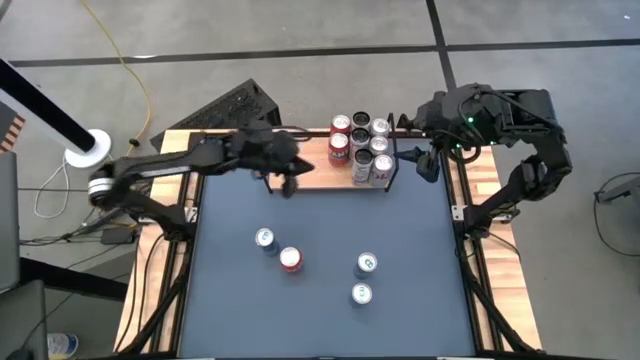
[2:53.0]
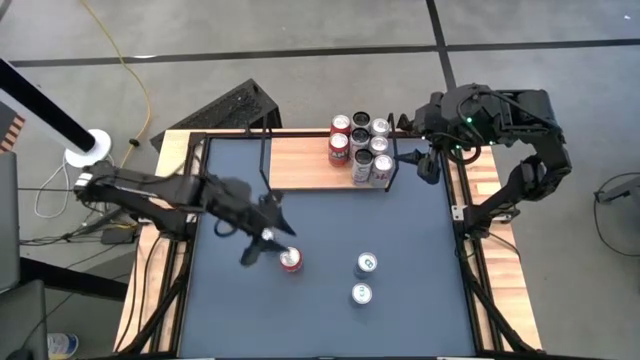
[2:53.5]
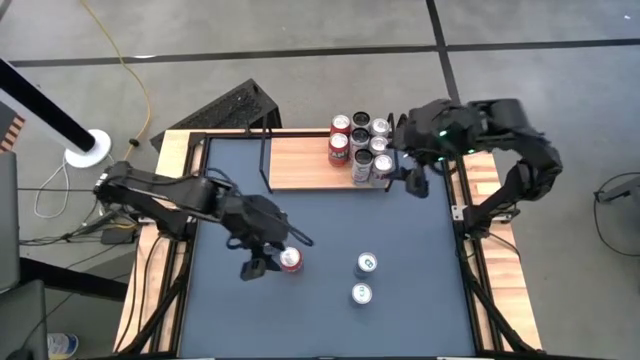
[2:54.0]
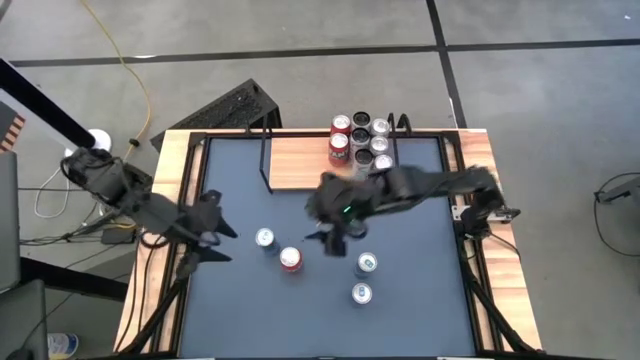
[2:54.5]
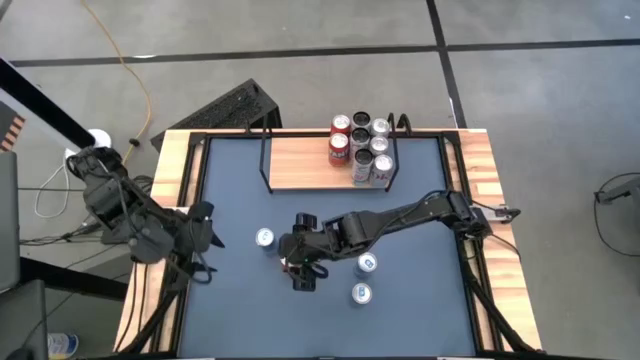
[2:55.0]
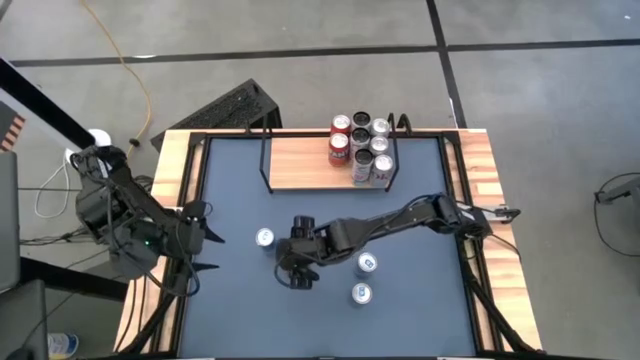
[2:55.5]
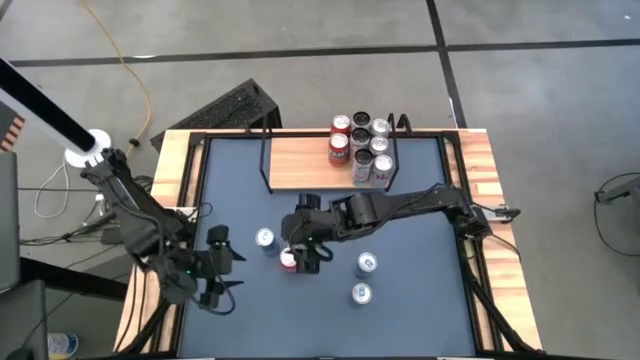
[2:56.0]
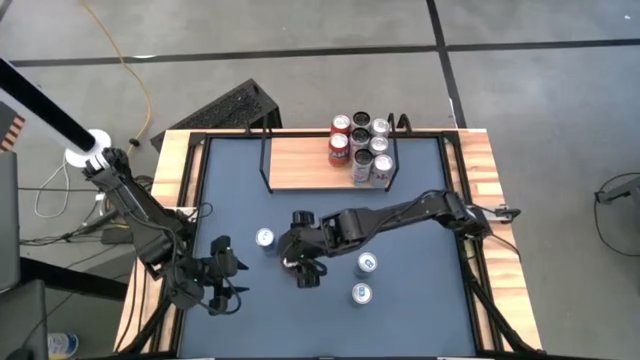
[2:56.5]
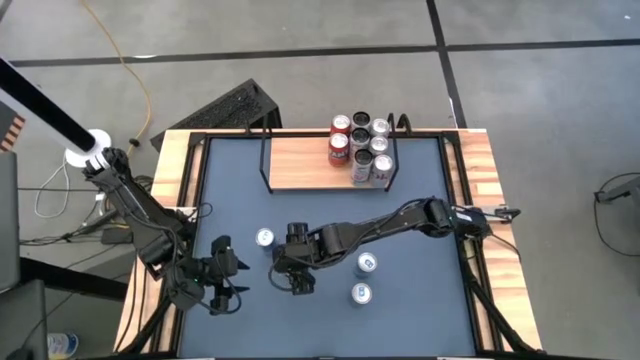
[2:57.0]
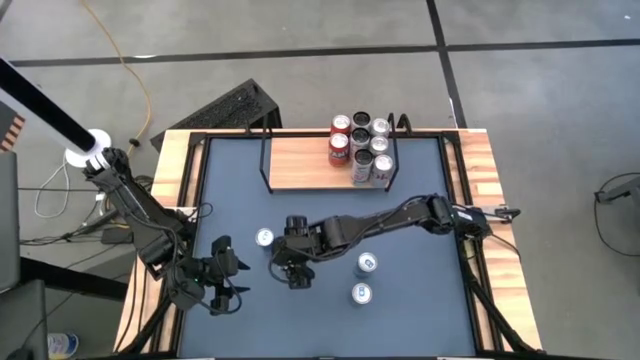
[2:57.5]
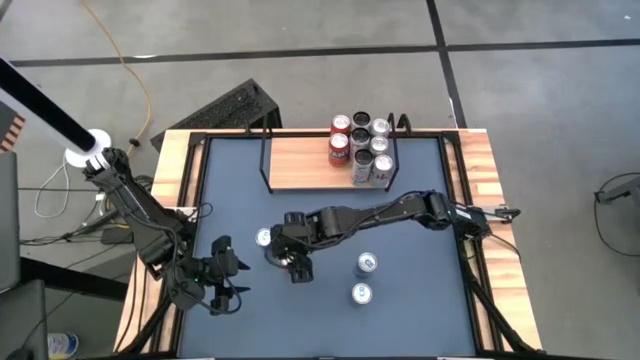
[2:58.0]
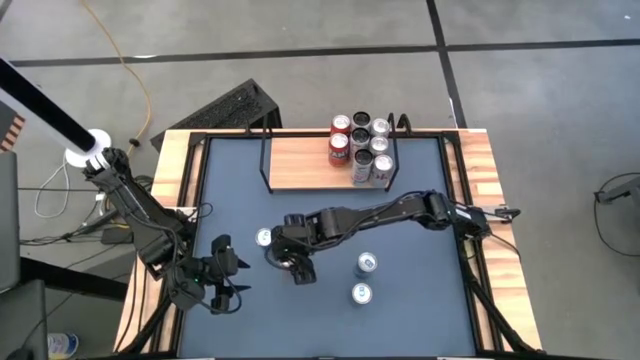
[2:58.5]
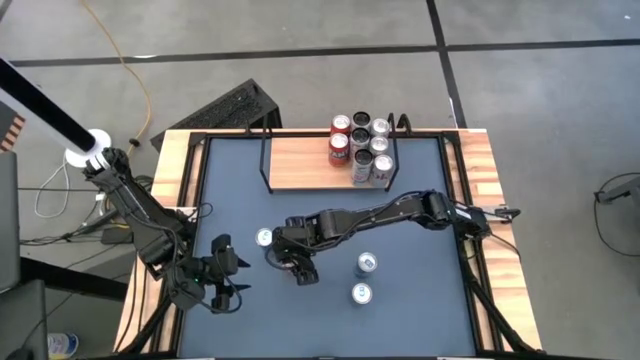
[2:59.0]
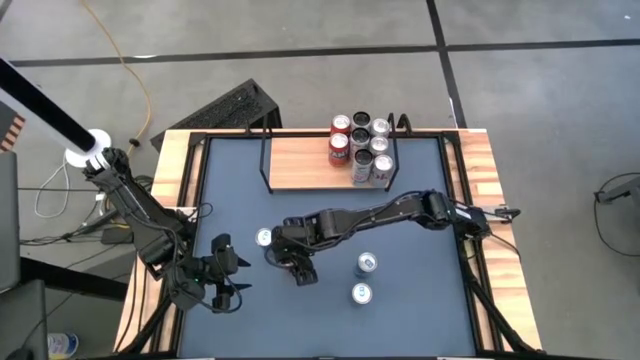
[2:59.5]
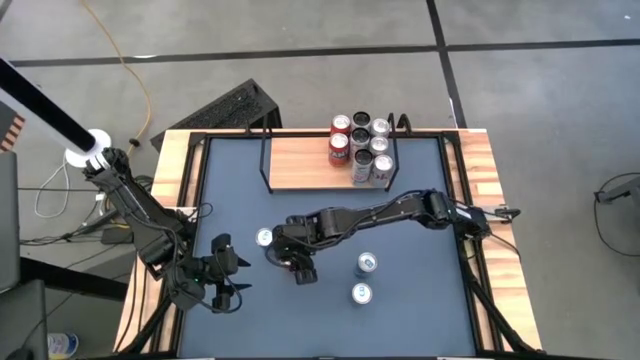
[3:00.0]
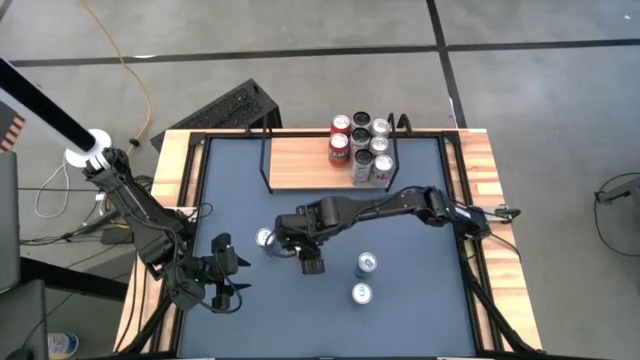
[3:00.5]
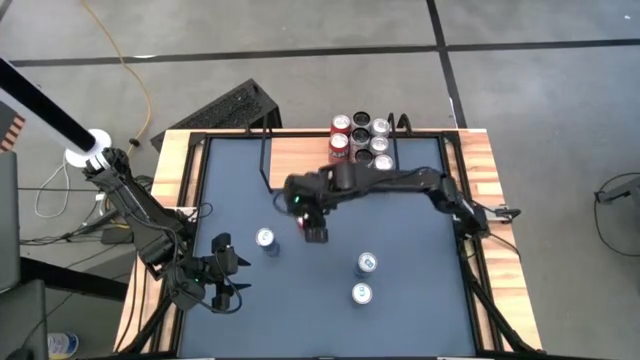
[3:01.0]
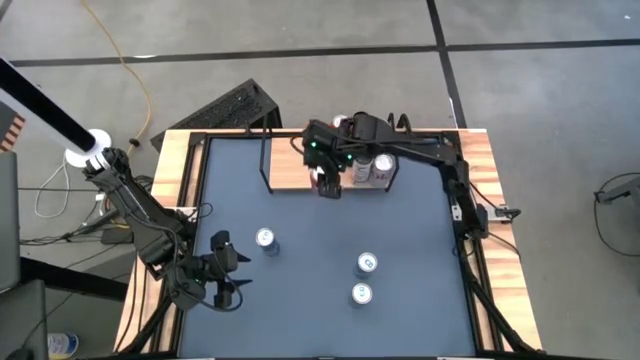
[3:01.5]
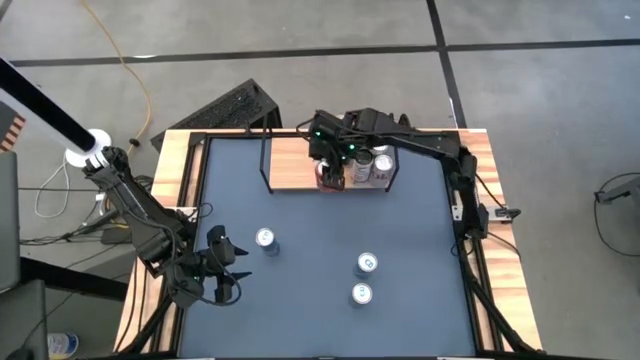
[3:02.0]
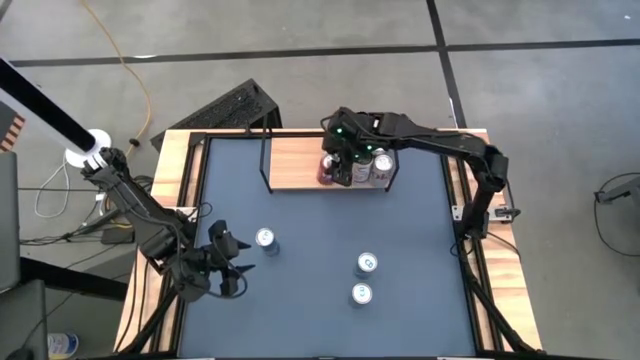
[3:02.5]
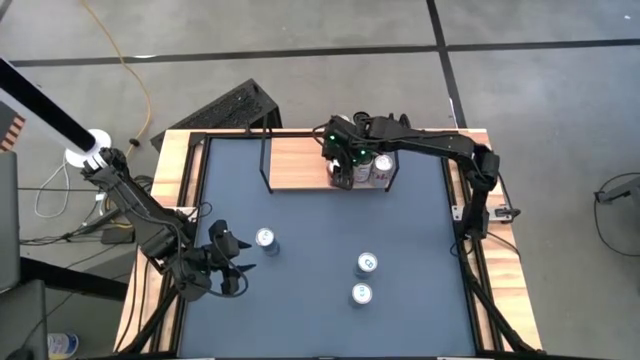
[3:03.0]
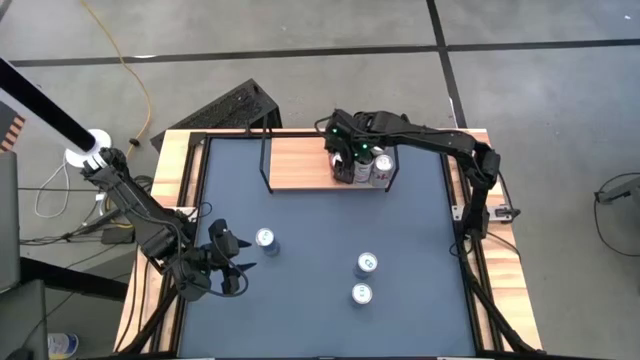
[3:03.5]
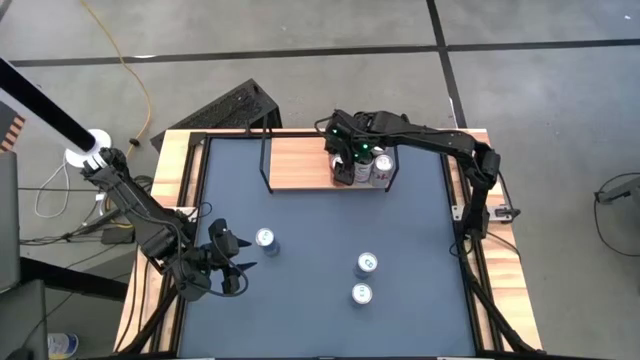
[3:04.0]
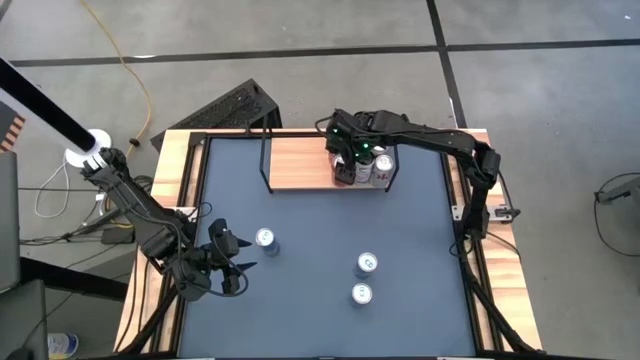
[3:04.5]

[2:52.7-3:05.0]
Task: Place canned beverage on shelf
Put the red soda can on the shelf aligned with the other red soda cans

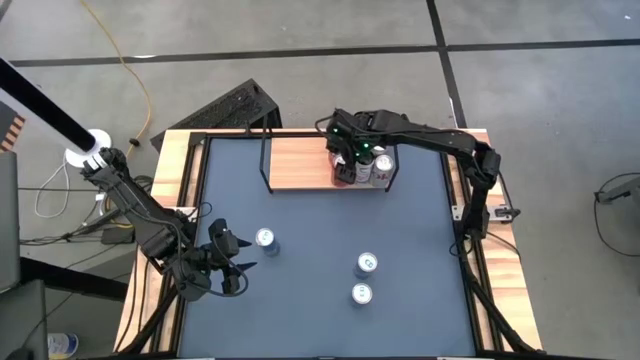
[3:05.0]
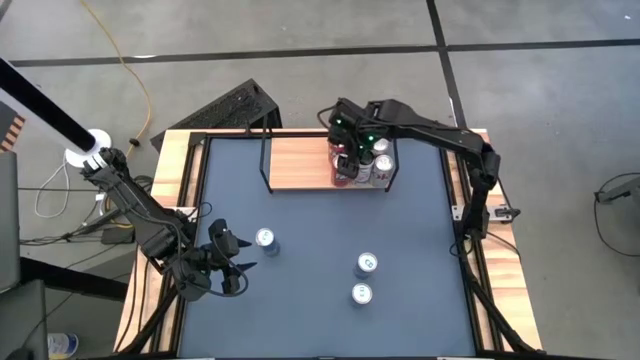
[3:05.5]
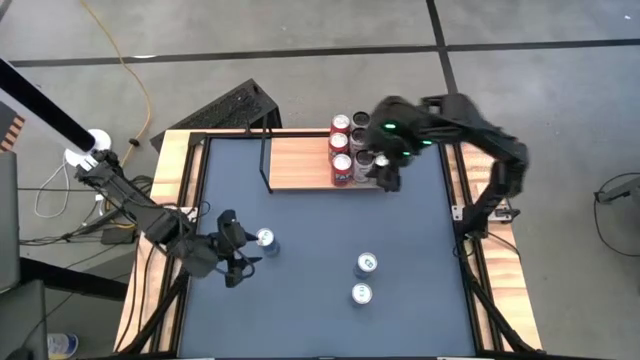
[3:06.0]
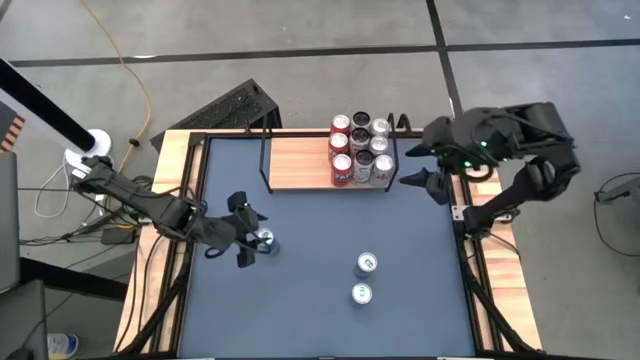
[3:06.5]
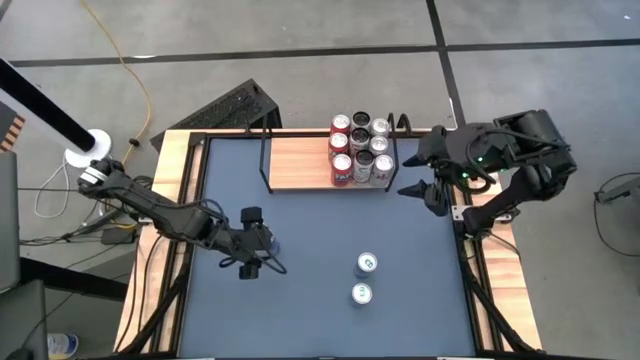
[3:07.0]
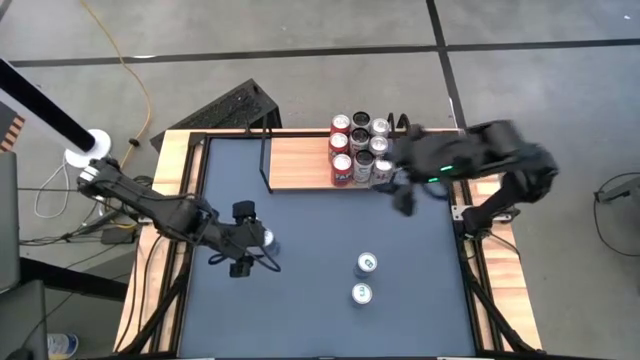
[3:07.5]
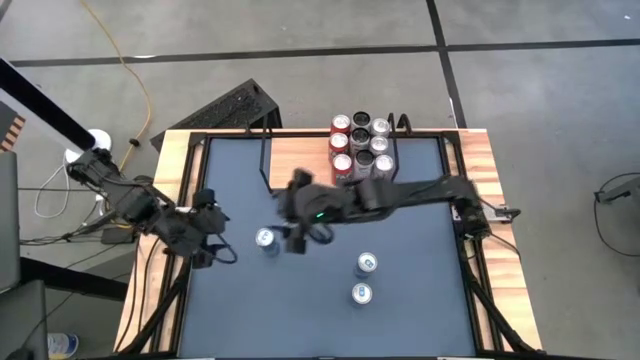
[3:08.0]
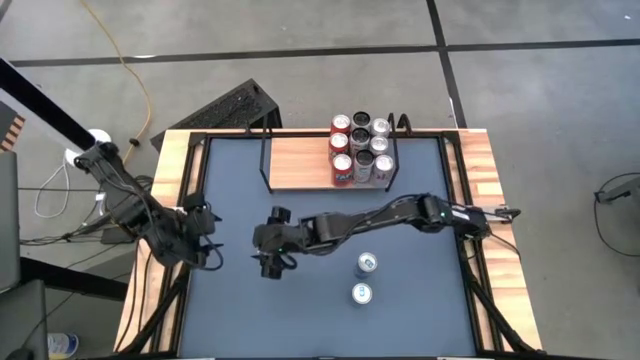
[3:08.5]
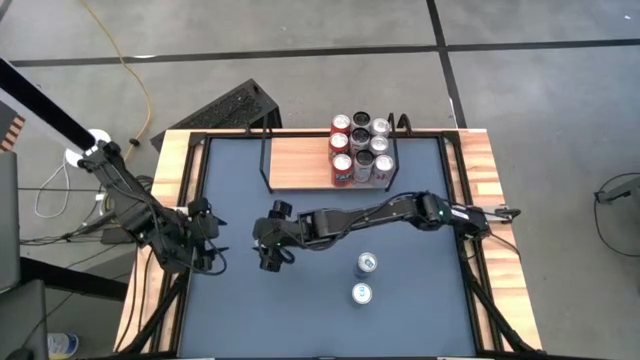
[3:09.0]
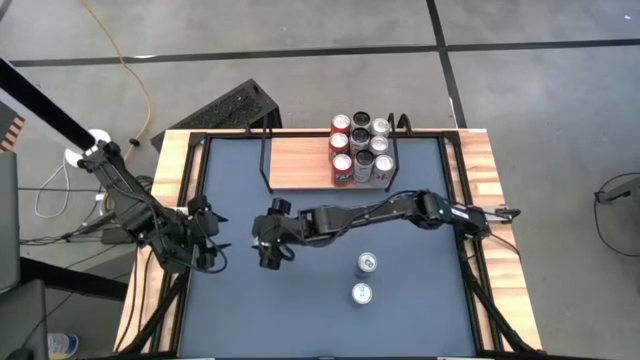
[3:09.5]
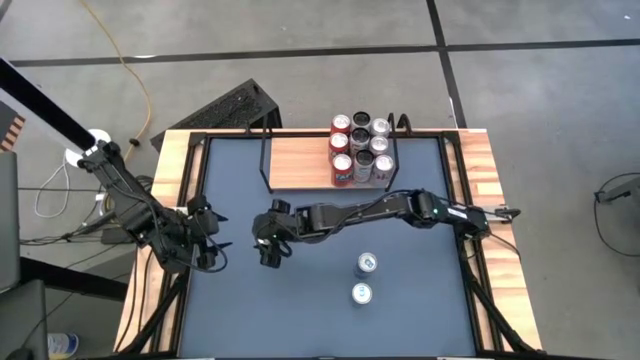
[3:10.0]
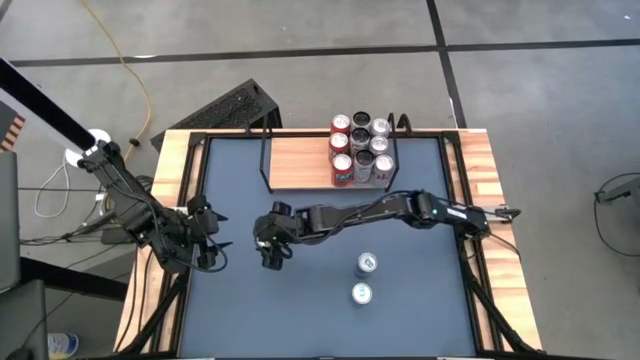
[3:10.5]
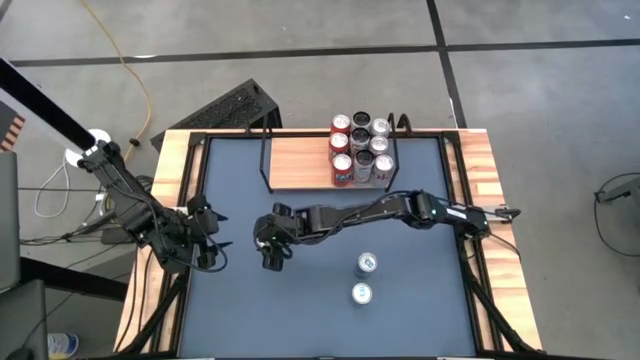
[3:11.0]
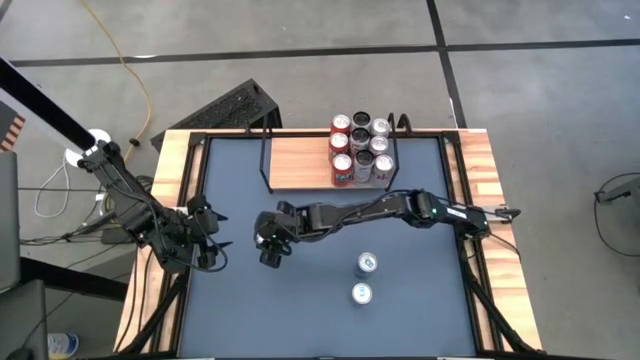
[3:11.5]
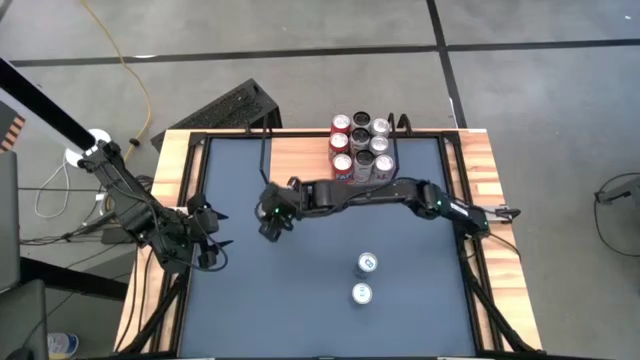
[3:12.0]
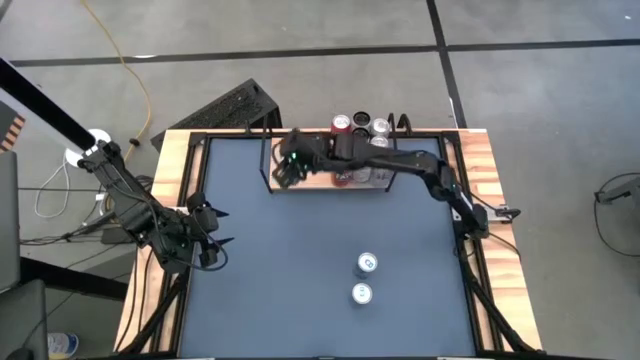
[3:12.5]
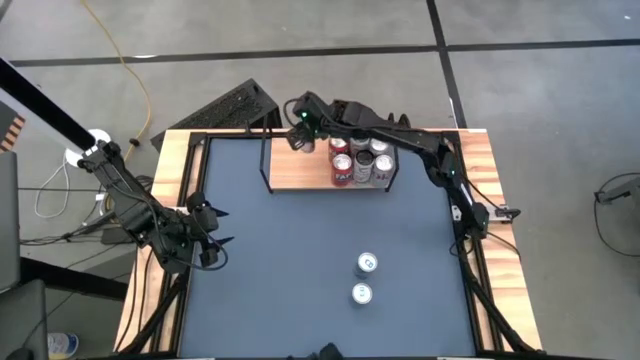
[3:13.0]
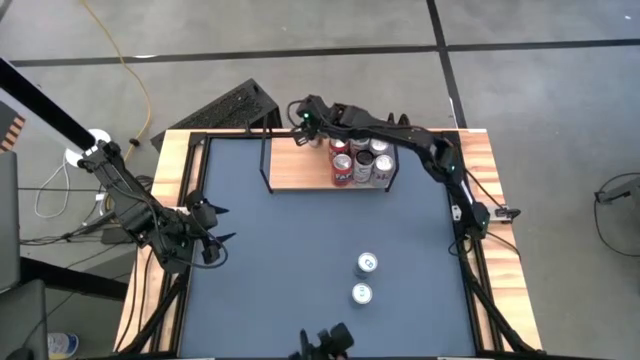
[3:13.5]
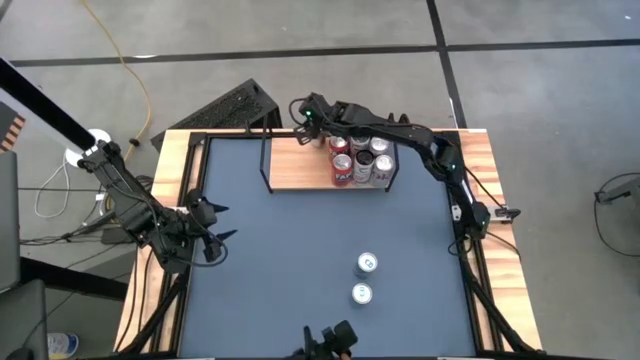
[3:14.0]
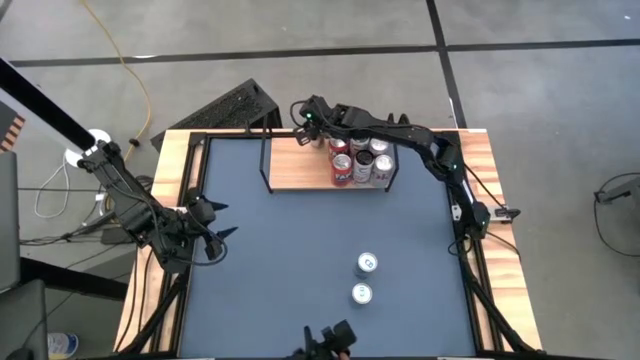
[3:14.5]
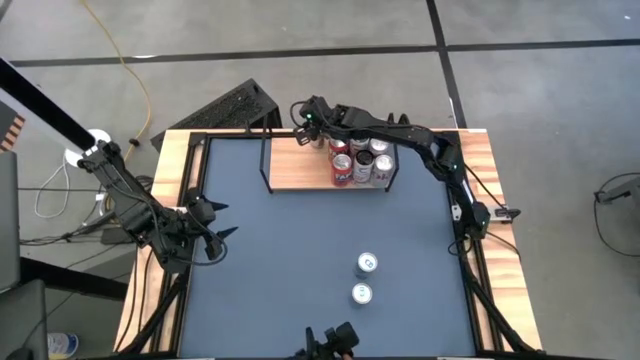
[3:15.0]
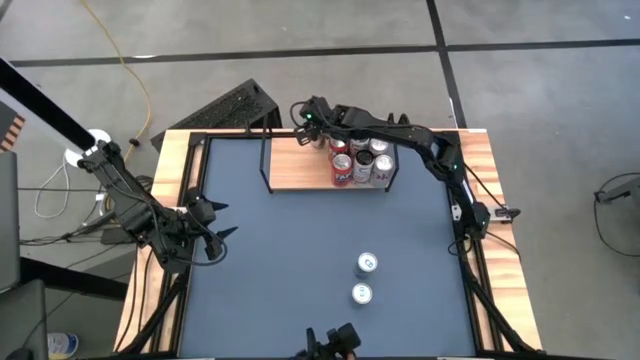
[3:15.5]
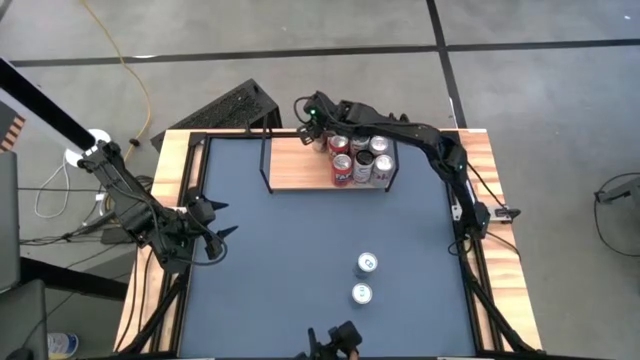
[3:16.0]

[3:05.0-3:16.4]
Put the left blue soda can on the shelf
